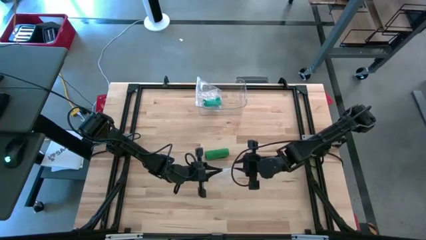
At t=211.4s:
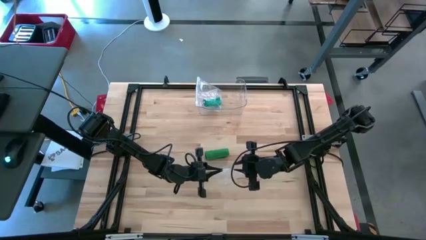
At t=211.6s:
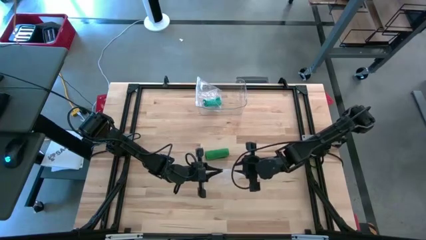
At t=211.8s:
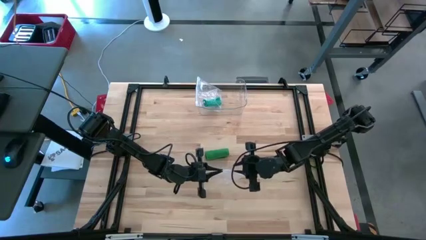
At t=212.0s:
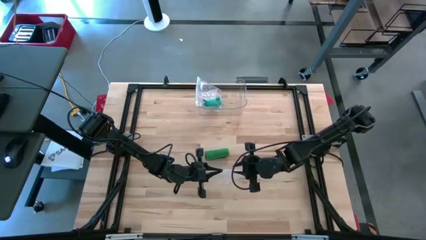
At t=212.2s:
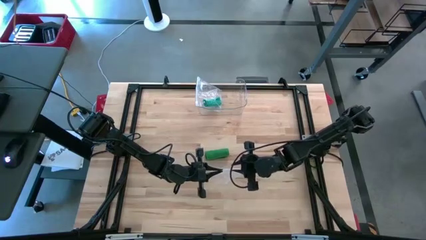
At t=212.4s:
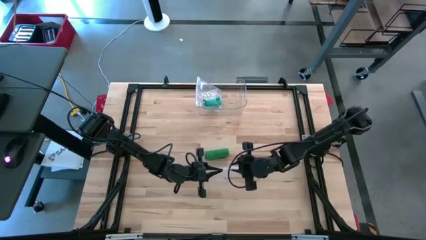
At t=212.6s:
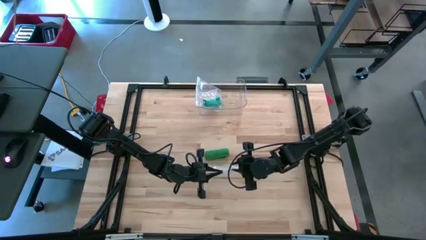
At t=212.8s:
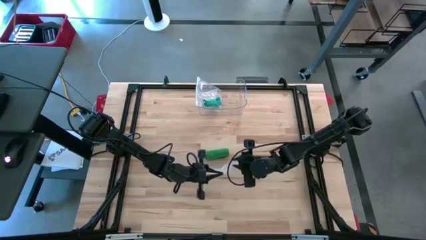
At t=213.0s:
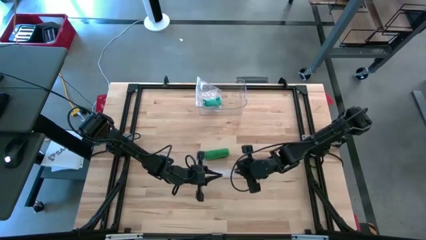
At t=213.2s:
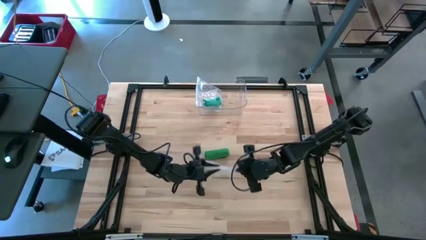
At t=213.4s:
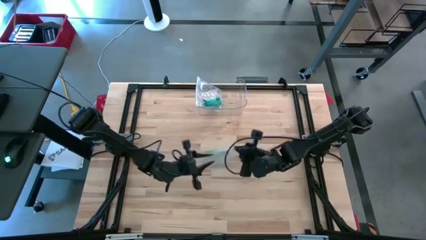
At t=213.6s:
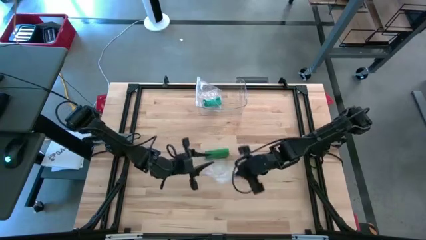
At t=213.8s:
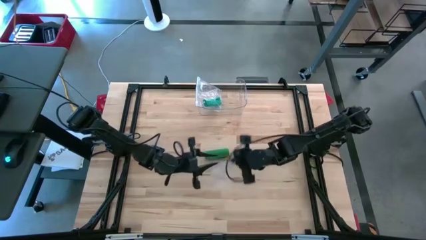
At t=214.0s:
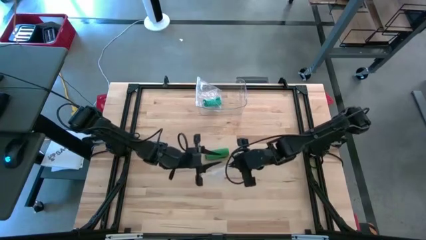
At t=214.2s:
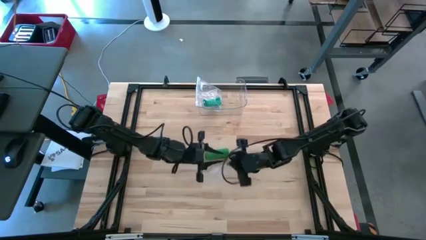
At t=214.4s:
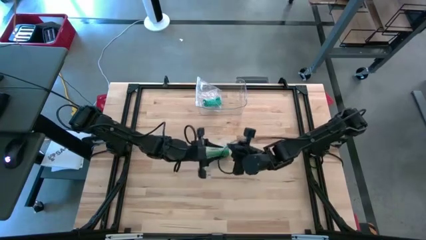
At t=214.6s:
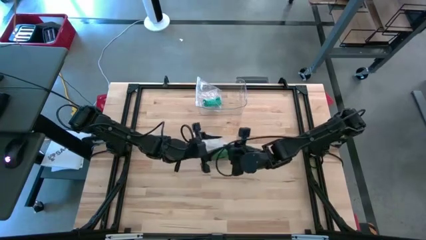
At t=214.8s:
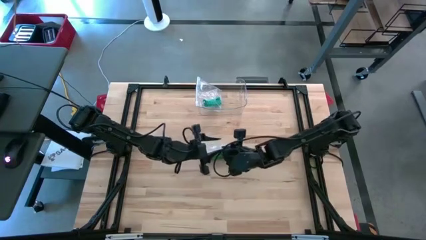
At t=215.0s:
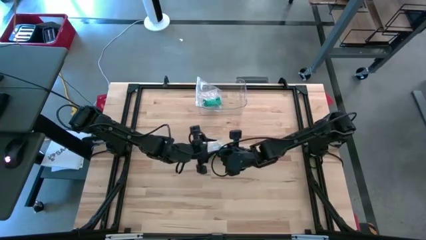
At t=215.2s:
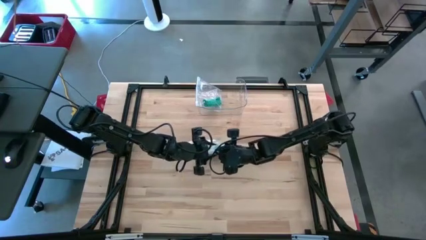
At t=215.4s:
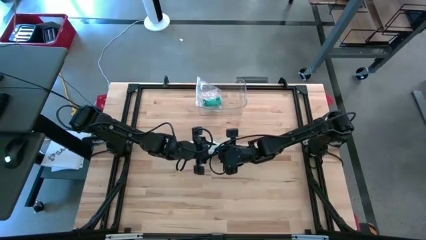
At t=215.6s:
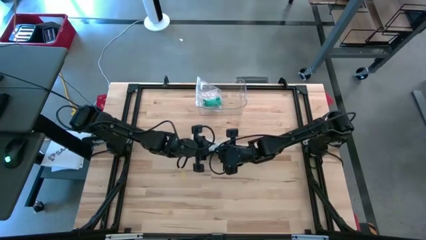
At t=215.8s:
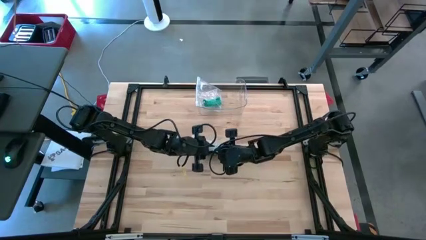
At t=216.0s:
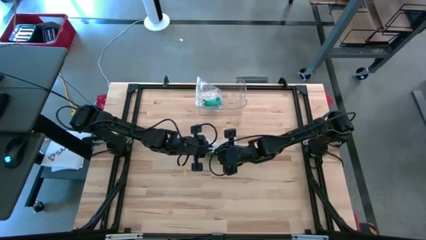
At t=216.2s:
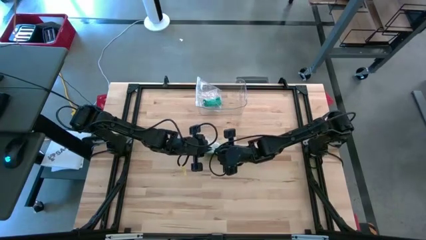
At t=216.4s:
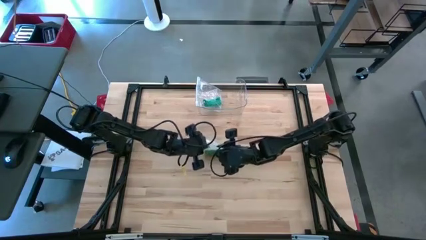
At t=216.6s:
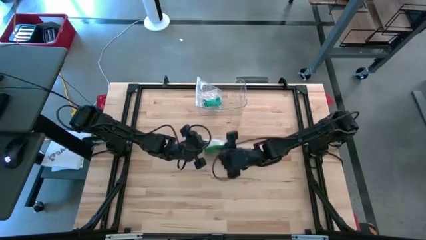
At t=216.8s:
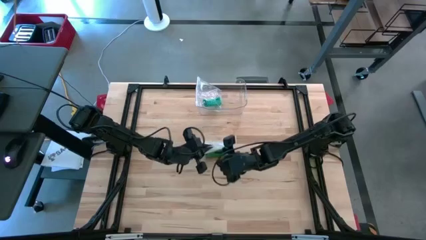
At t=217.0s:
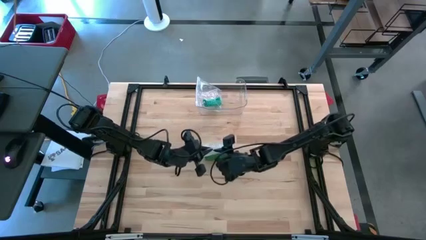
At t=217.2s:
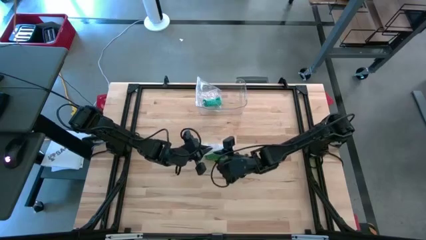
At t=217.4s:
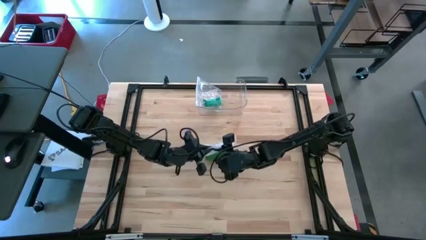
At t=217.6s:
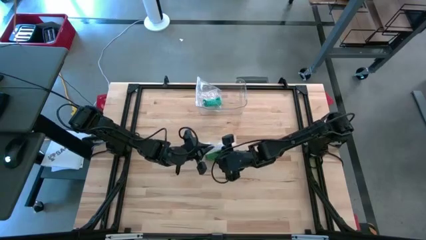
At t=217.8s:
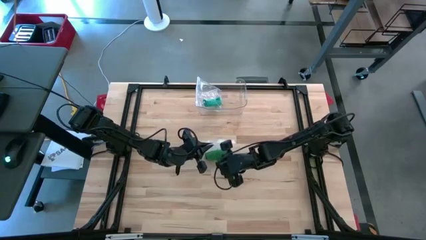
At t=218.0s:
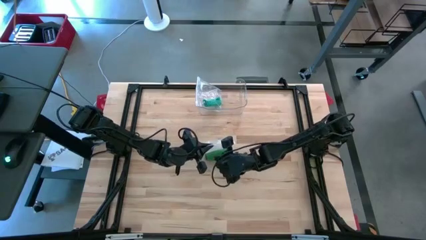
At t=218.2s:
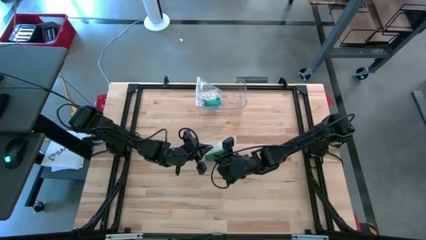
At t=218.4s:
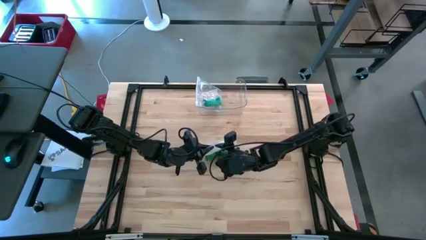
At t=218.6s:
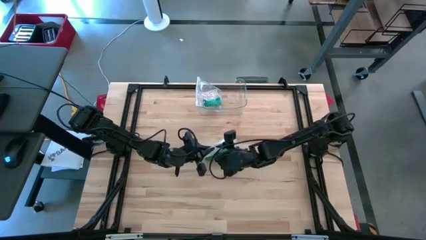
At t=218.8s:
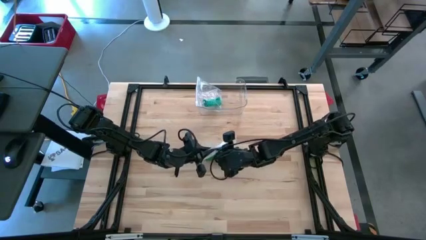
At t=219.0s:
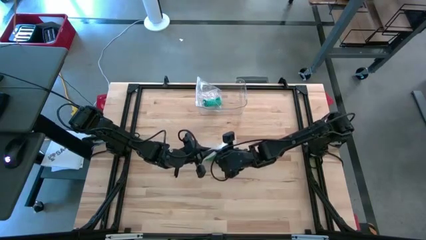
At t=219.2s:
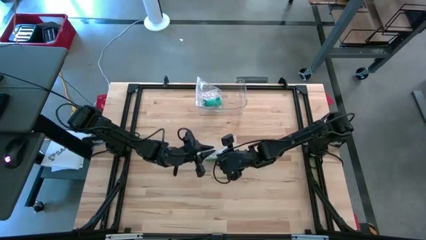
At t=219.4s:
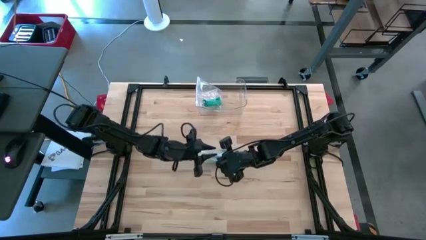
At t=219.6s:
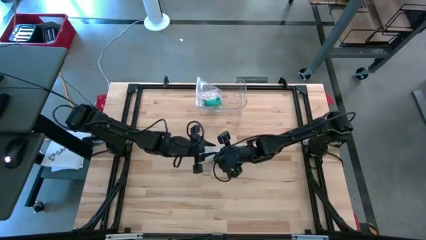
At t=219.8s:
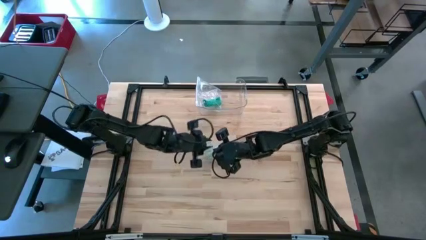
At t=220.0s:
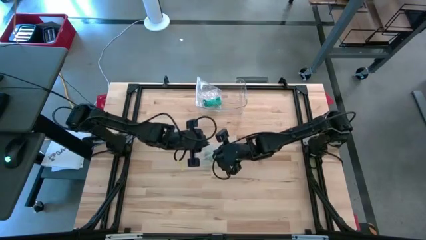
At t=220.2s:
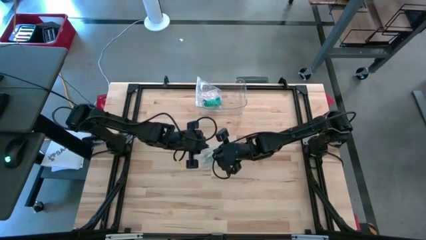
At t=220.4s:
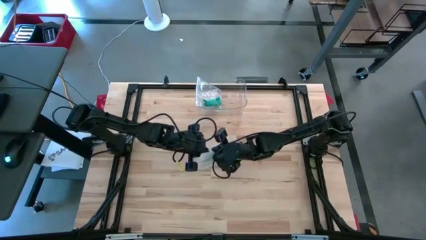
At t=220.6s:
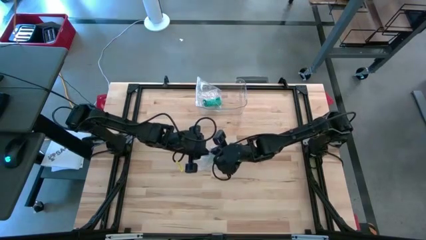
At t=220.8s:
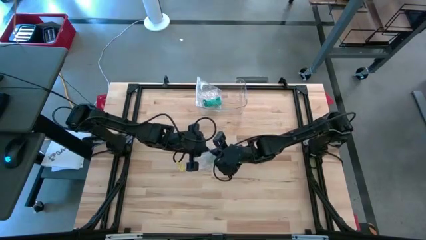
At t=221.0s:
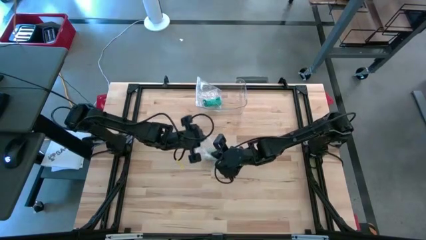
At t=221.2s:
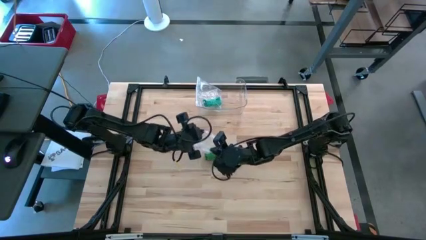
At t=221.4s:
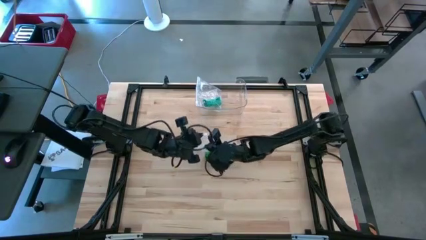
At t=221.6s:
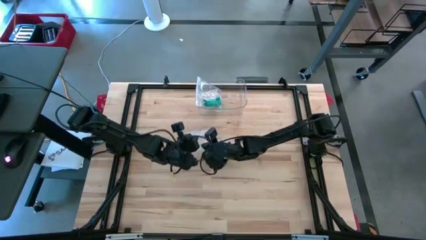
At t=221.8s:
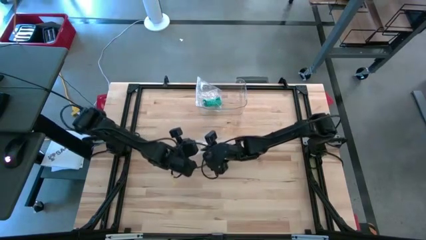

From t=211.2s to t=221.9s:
Task: Roll bandage
Open the zip bag

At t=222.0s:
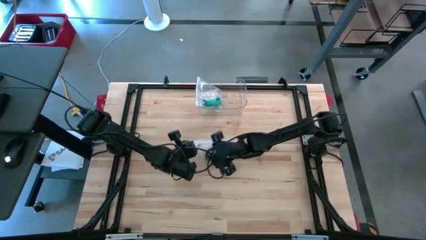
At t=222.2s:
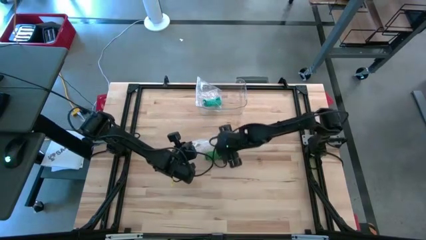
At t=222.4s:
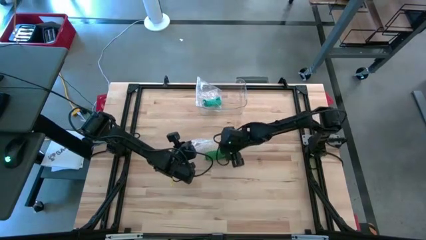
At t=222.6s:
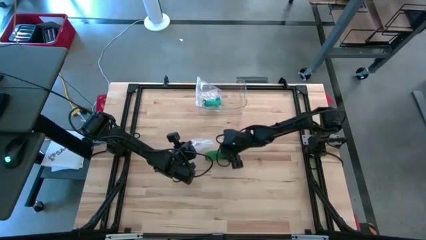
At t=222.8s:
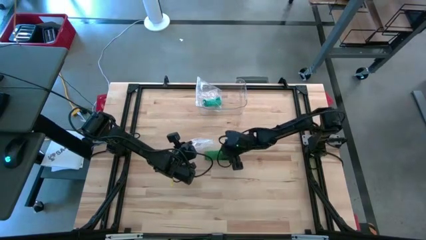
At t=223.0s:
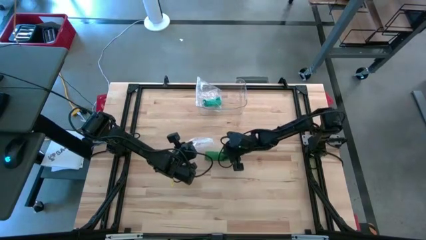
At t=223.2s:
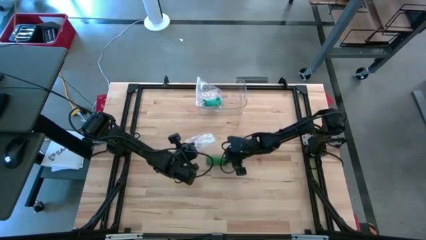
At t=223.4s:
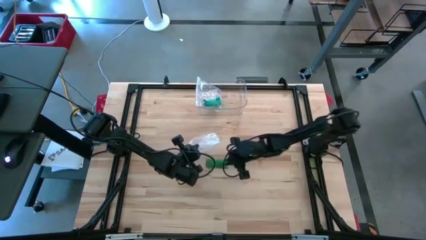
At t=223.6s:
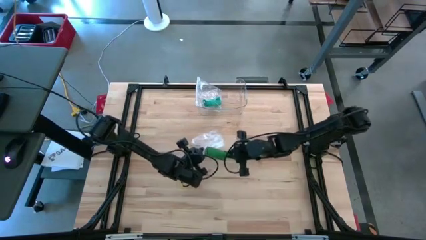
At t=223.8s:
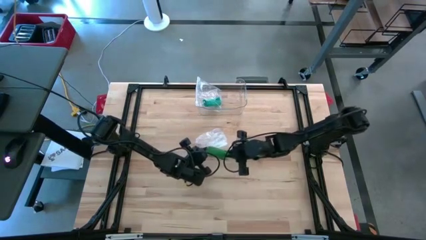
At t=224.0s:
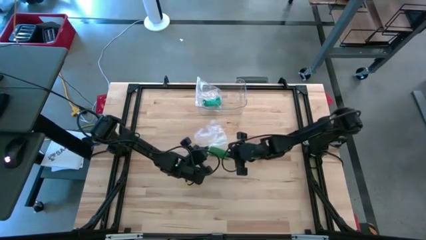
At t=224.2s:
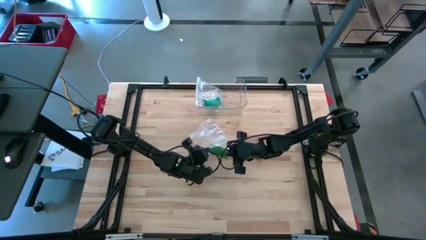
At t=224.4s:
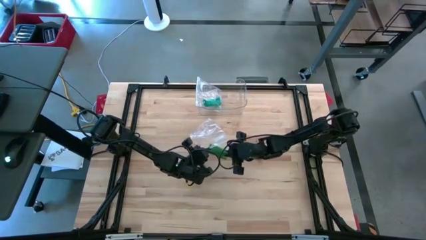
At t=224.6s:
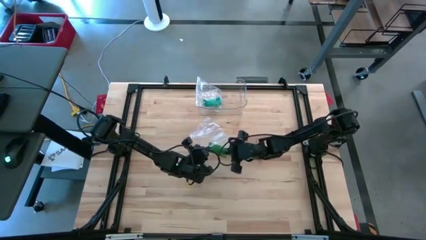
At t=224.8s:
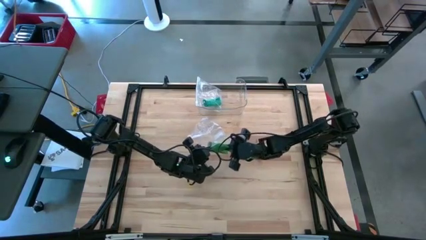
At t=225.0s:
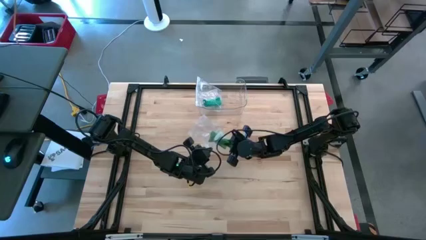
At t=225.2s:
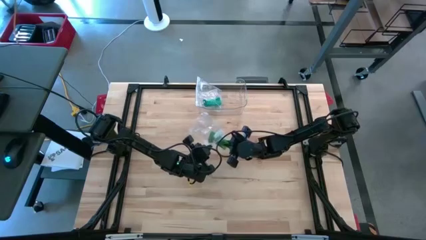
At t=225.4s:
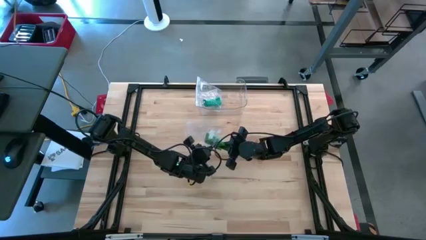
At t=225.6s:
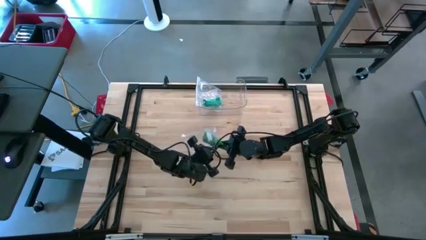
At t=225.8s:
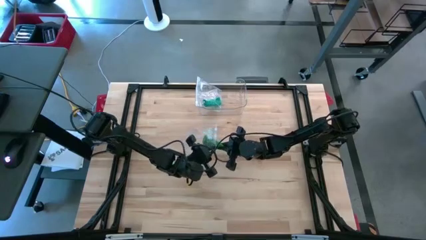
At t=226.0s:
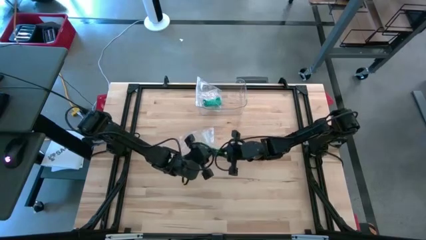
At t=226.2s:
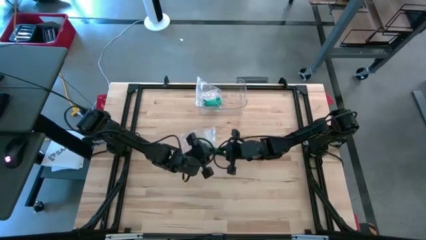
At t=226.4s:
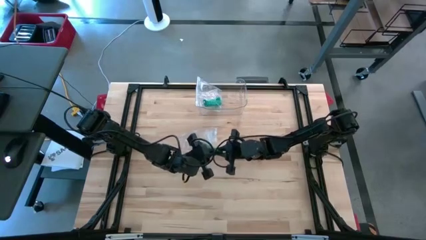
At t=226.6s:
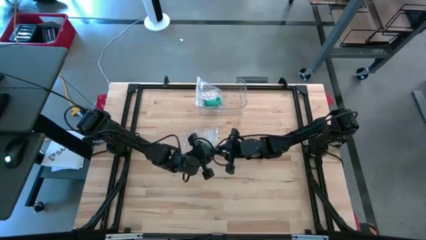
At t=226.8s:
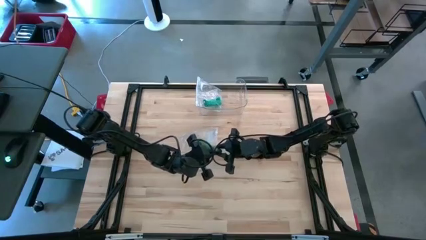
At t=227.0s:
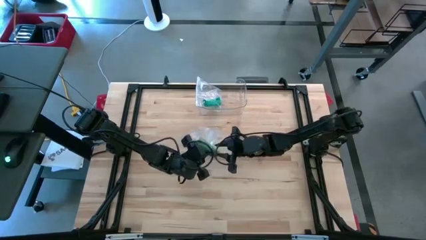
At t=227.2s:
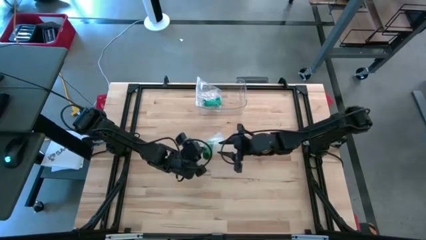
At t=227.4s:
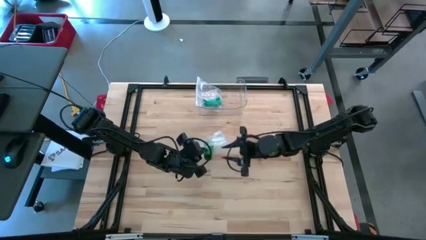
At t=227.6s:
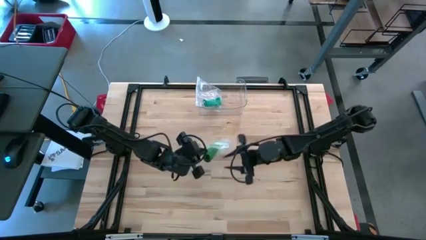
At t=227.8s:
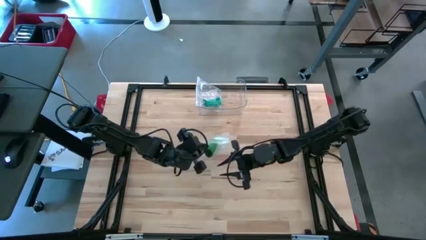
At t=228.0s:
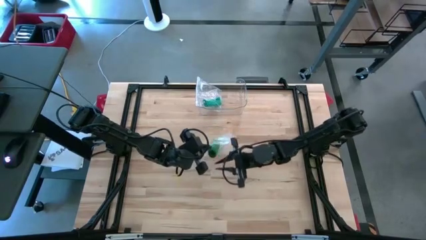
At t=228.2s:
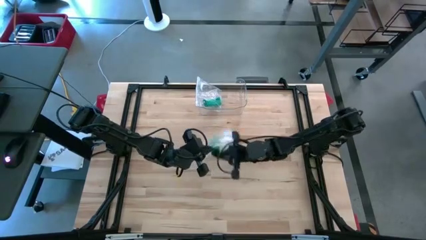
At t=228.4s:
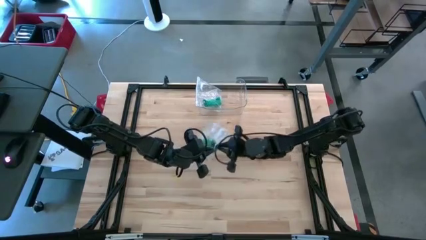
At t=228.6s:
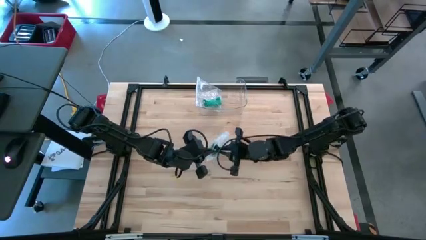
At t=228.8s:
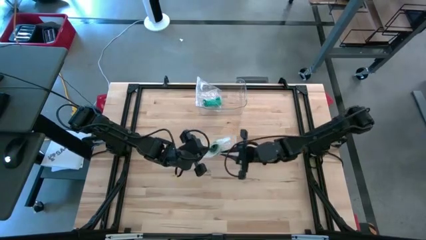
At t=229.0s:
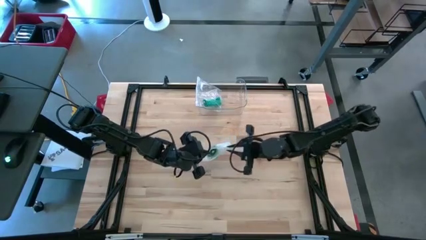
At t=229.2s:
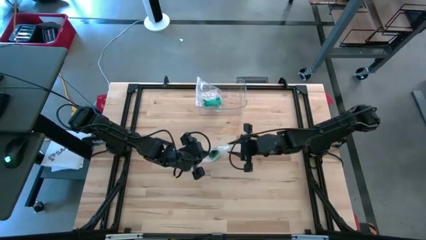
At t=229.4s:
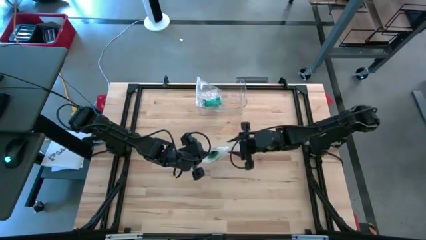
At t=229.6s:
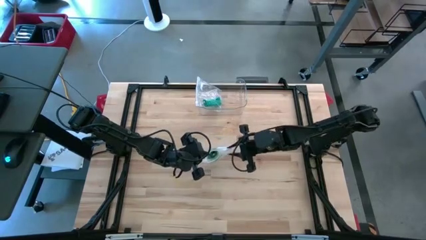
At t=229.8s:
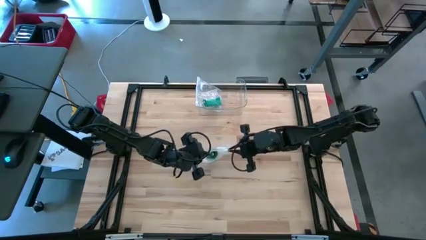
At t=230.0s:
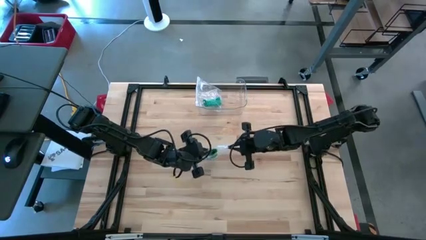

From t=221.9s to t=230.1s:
Put the rolled green bandage into the zip bag
